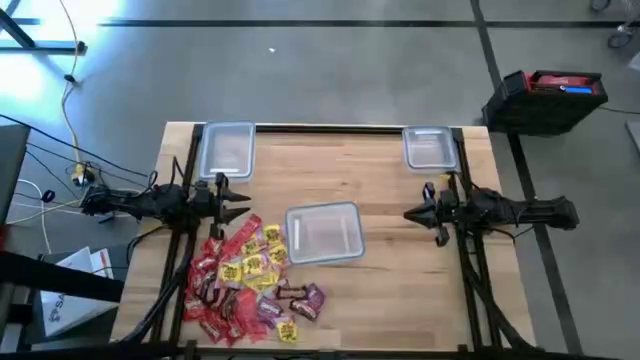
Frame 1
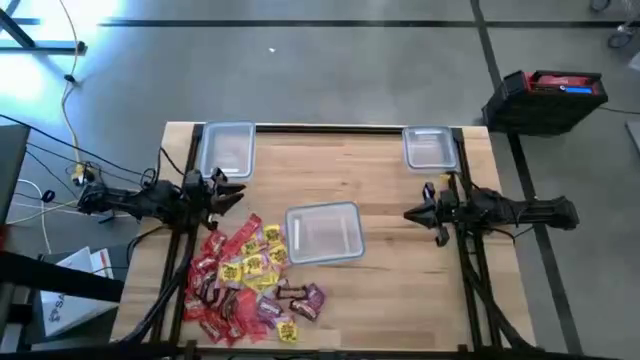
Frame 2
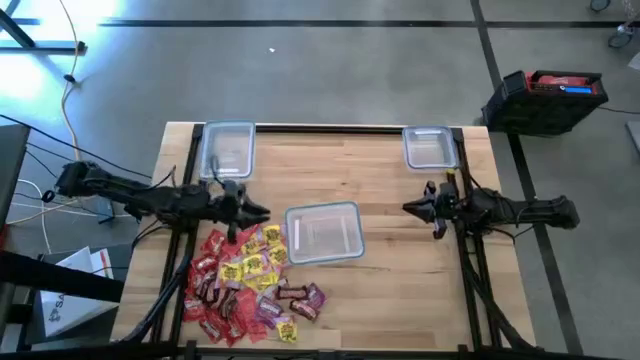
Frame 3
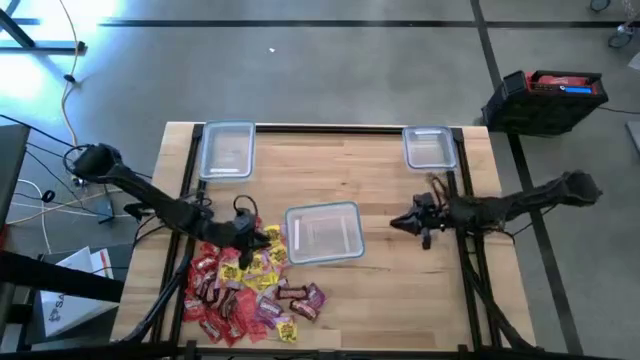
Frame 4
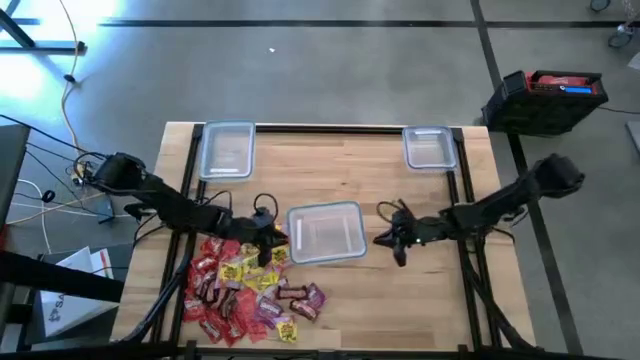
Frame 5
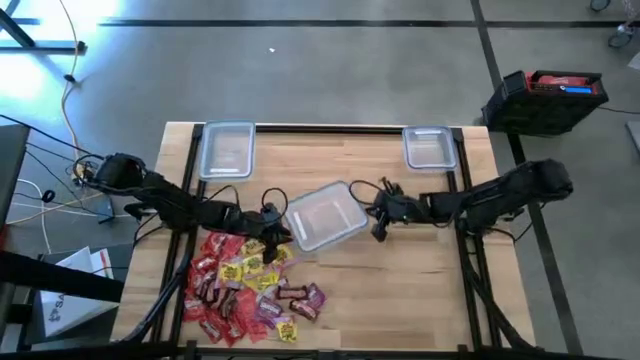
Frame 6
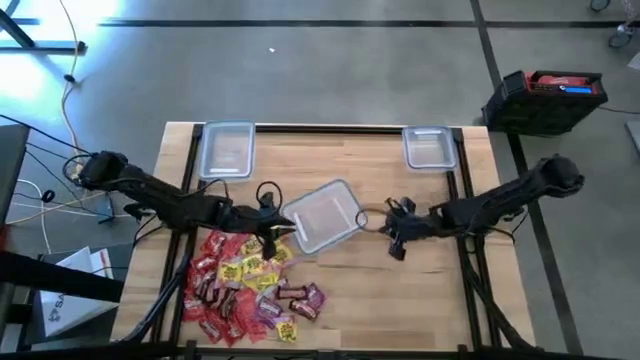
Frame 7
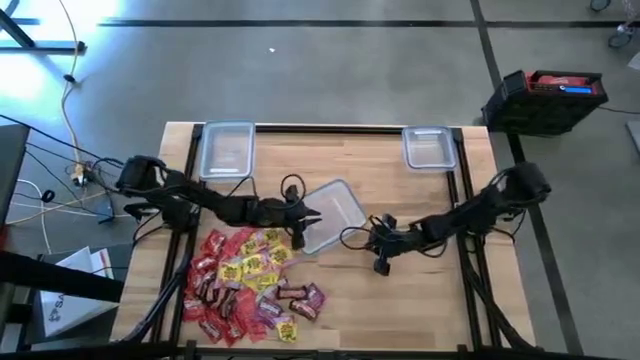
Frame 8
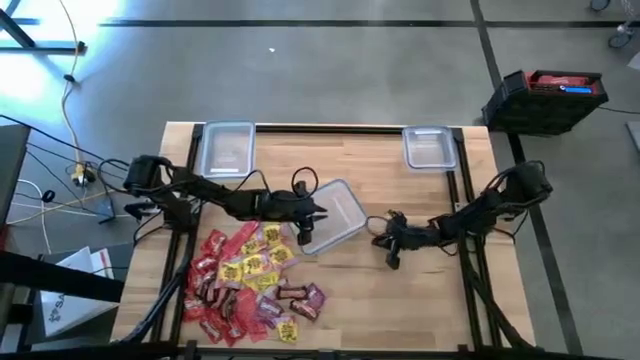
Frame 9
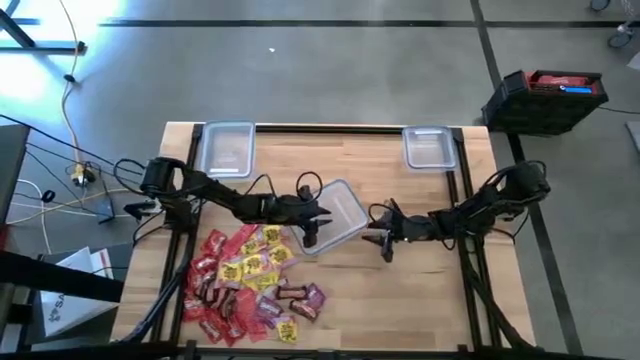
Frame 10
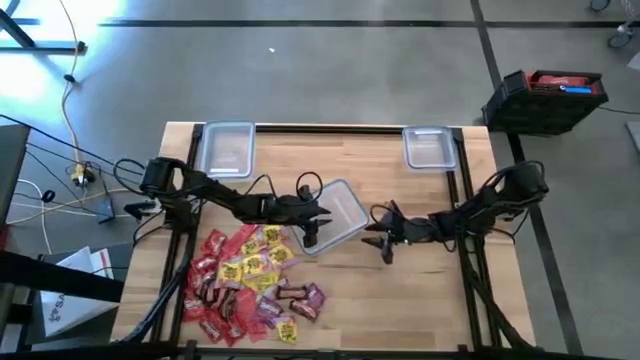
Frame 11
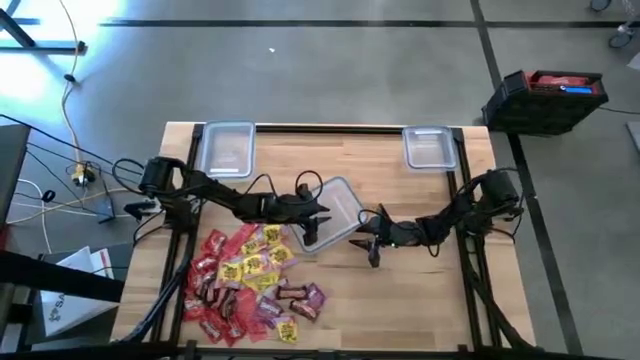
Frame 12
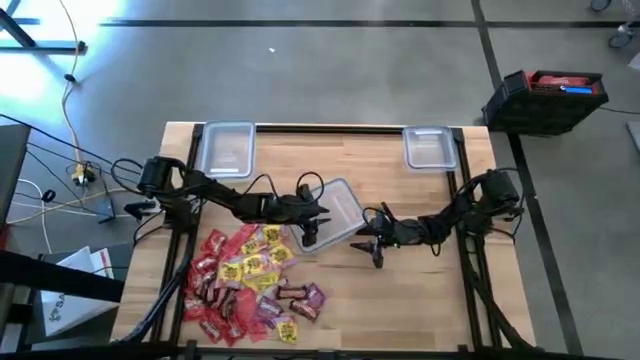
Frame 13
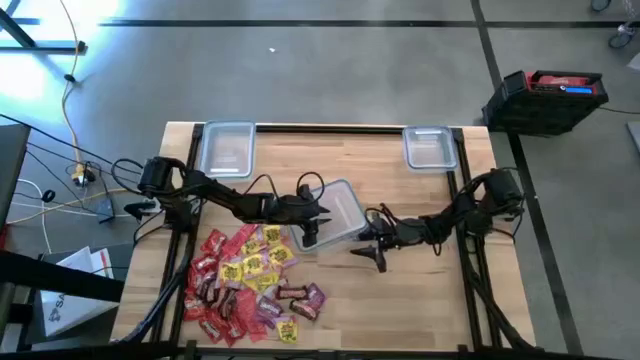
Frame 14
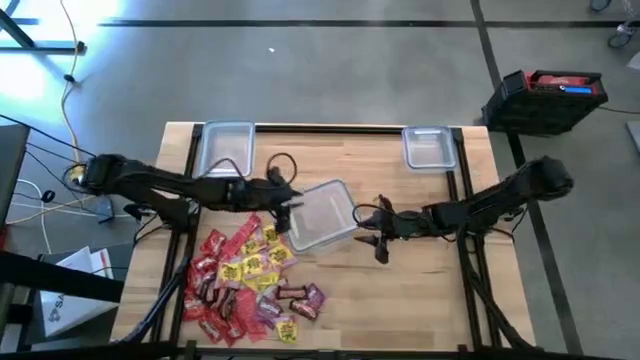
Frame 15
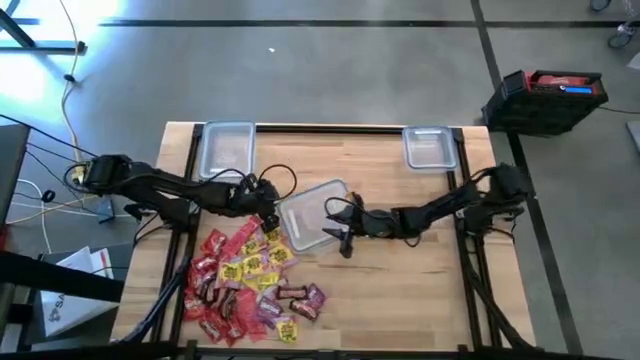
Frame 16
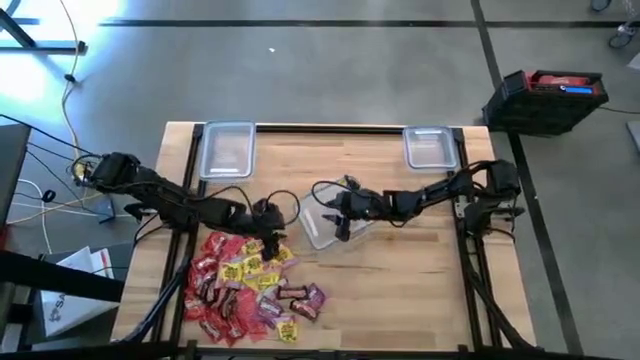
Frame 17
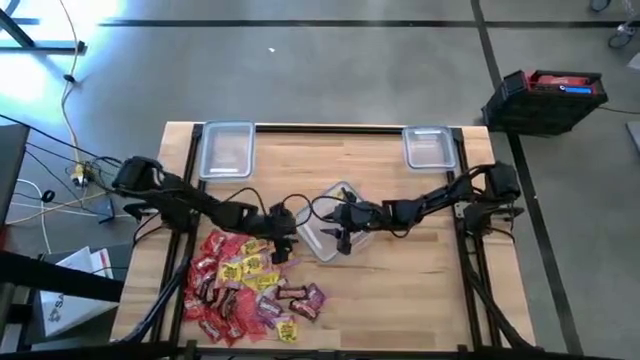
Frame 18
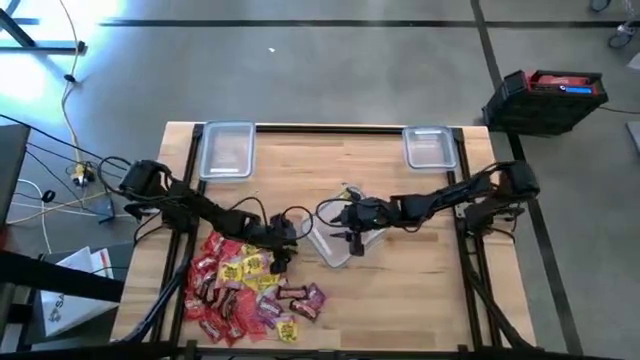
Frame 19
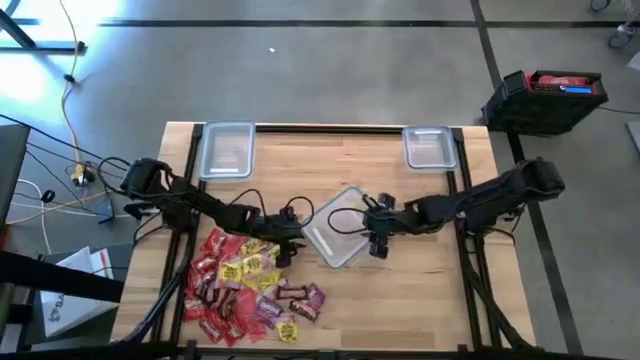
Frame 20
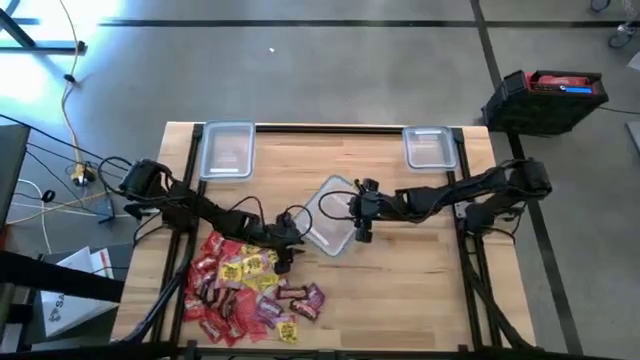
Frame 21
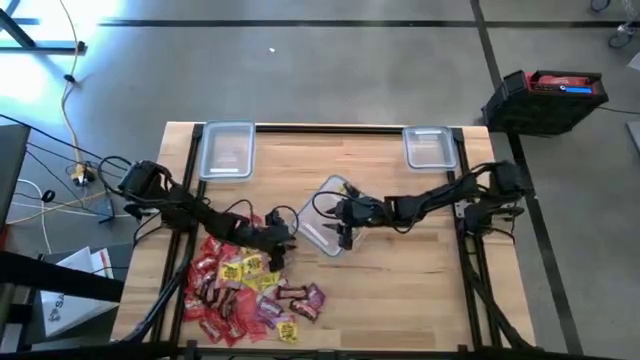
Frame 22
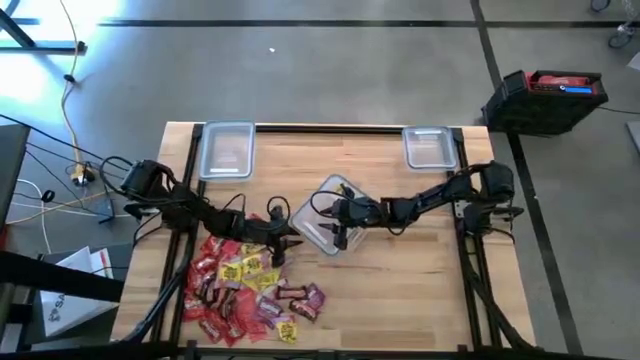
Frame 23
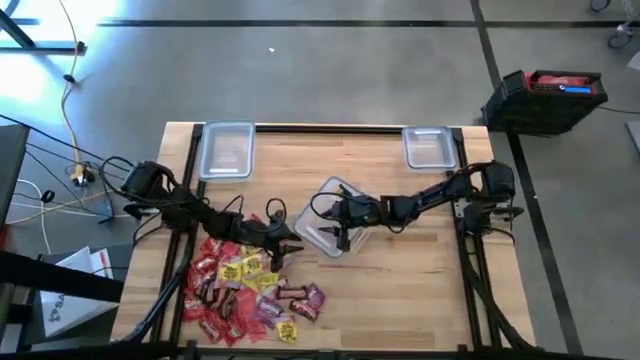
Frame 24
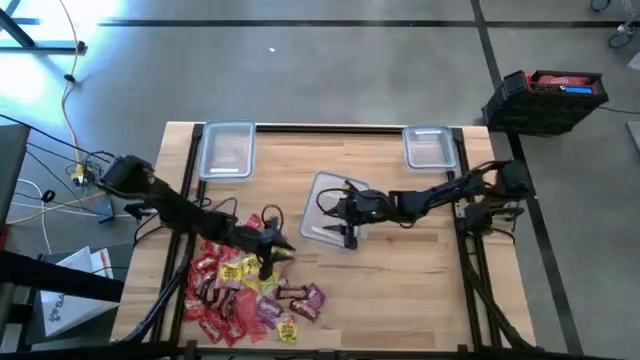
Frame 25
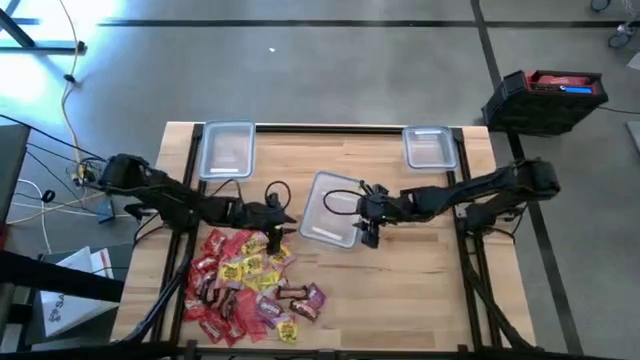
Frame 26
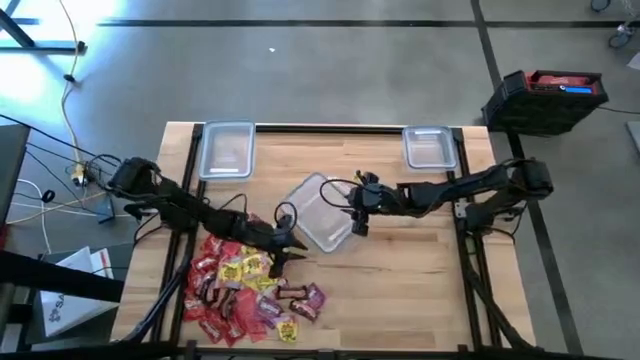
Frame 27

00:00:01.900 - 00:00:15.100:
Task: Sort candy
Open the transparent bin

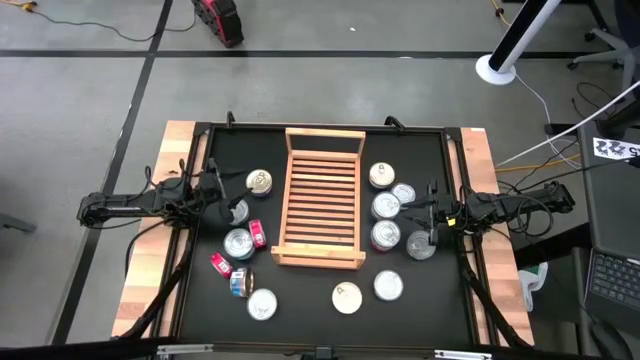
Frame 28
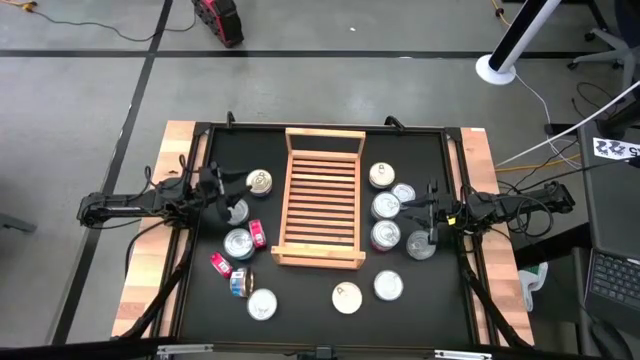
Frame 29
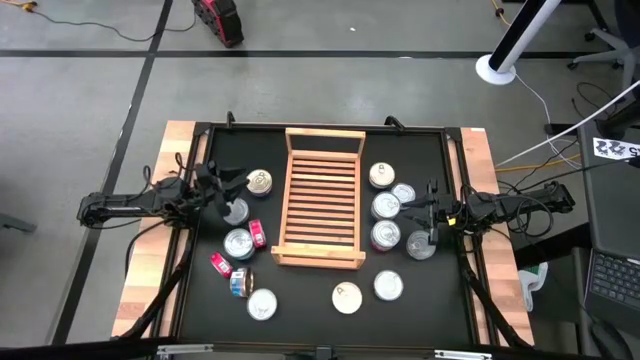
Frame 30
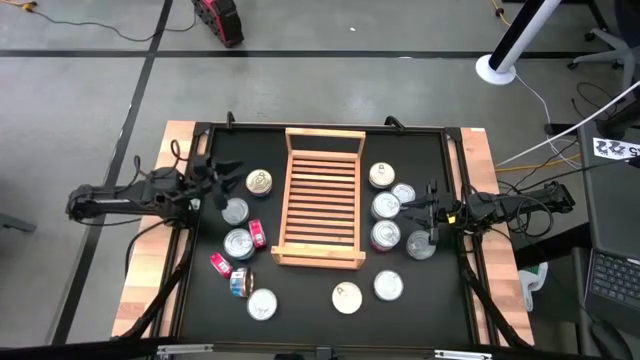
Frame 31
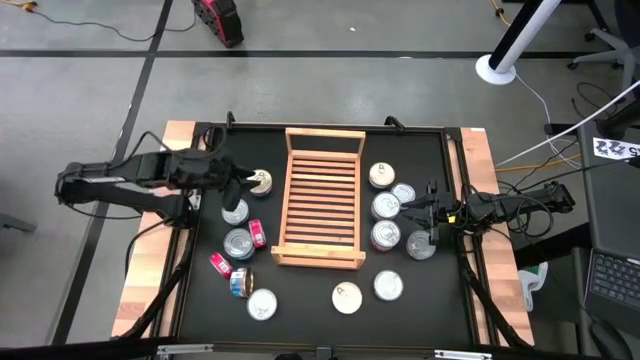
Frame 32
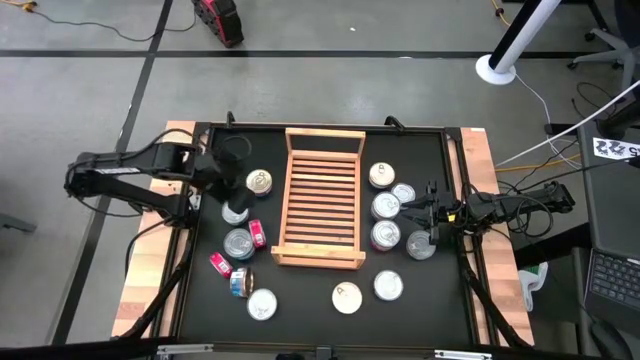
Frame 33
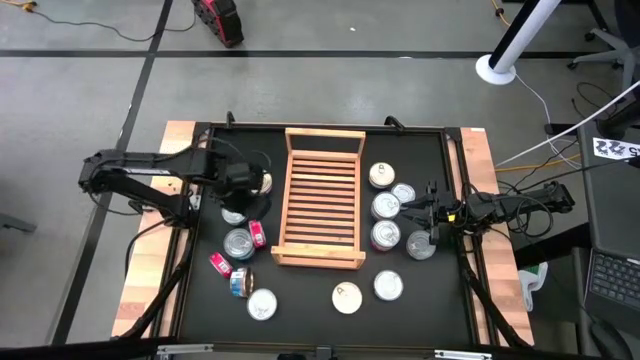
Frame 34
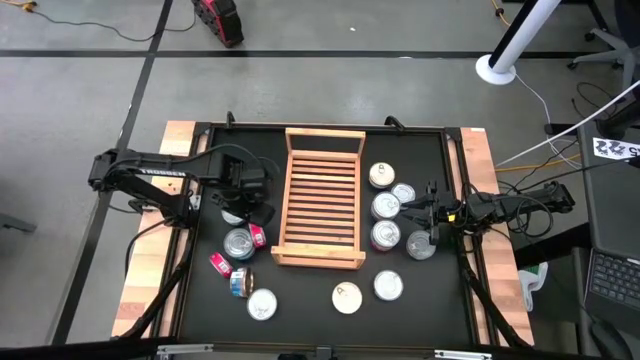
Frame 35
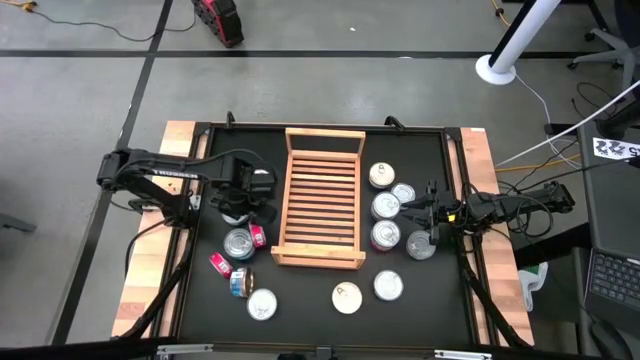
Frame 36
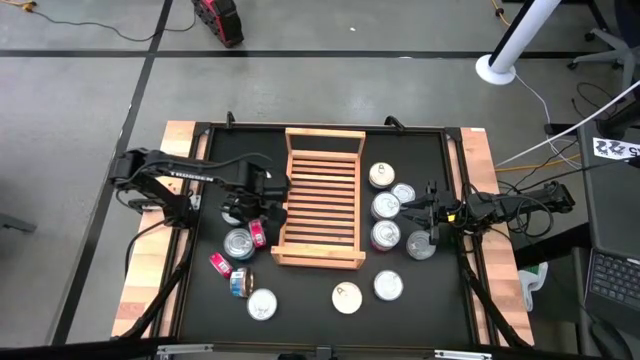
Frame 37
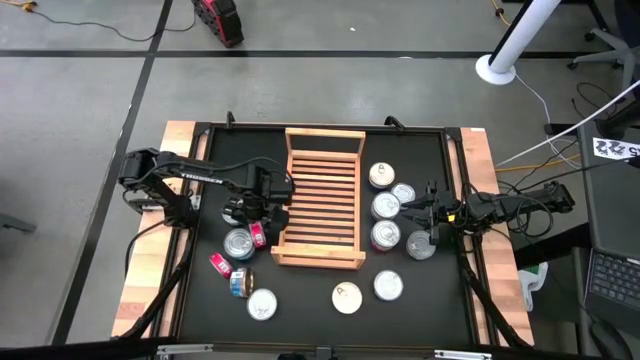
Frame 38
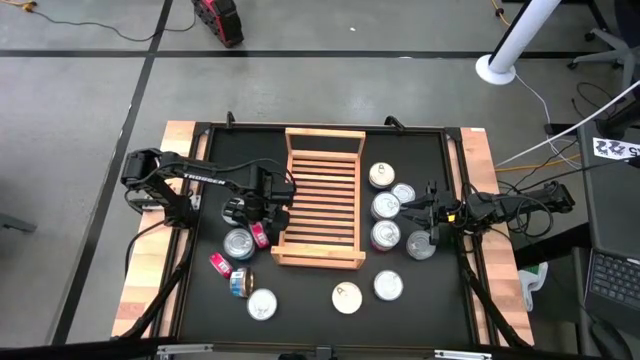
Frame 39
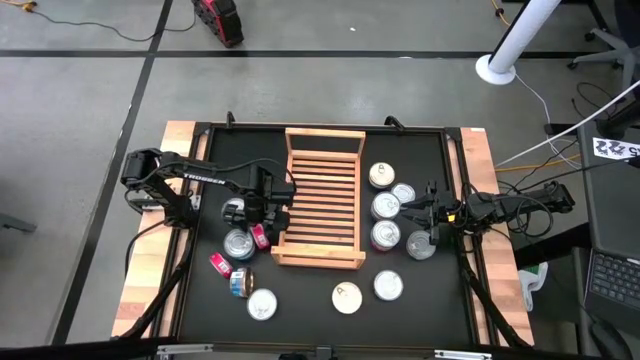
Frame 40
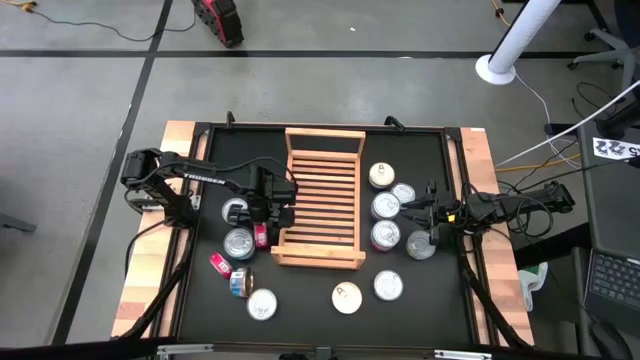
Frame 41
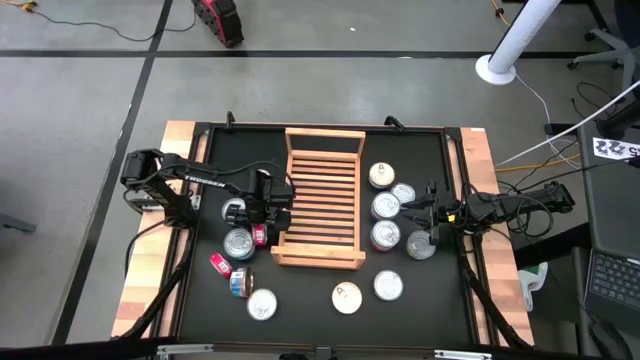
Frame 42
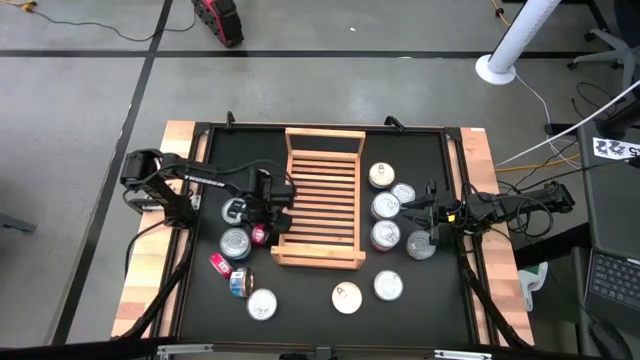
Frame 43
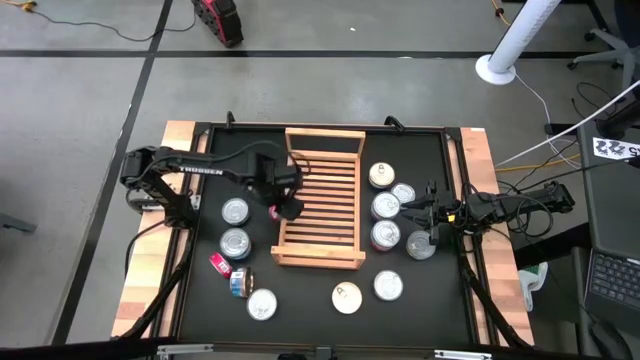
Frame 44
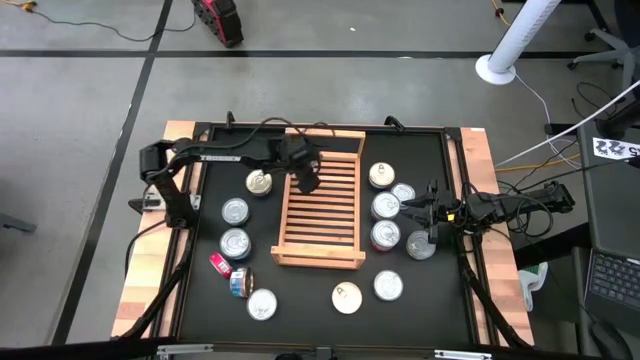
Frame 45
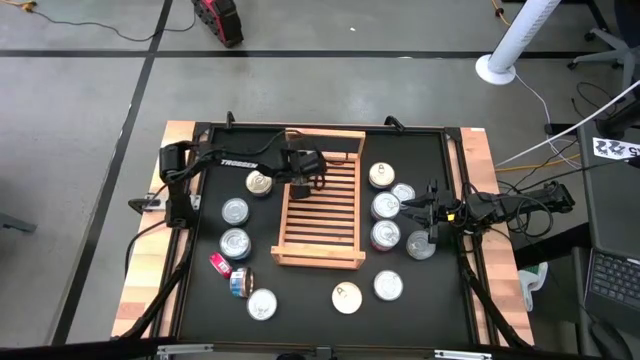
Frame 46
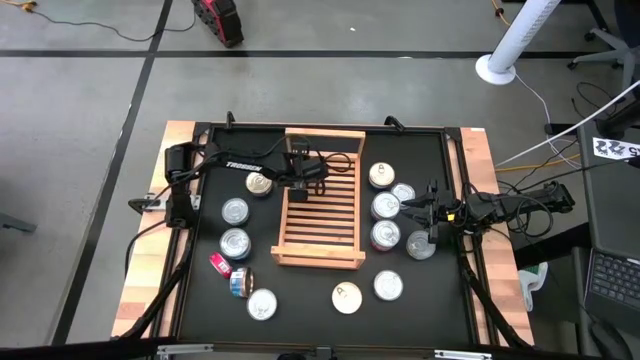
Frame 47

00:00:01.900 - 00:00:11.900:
Task: Stack canned seafood by type on shelf
Put the red tuna can on the shelf
